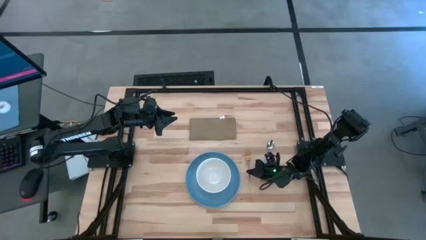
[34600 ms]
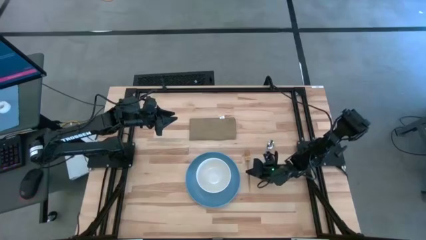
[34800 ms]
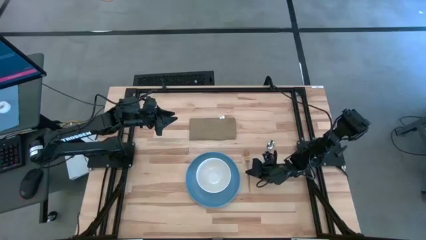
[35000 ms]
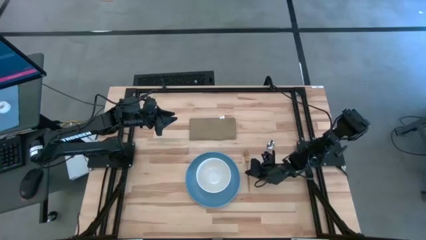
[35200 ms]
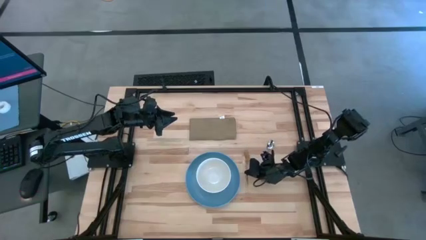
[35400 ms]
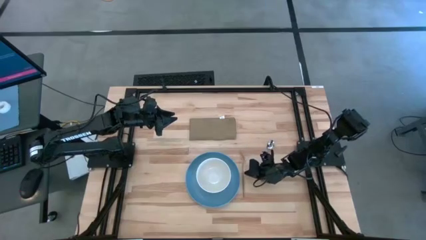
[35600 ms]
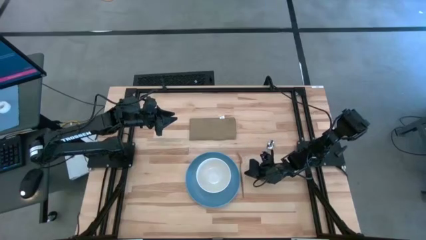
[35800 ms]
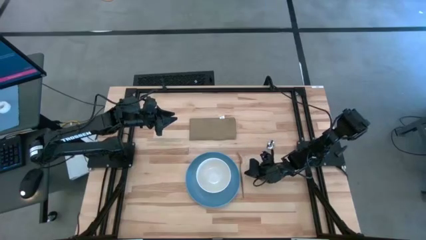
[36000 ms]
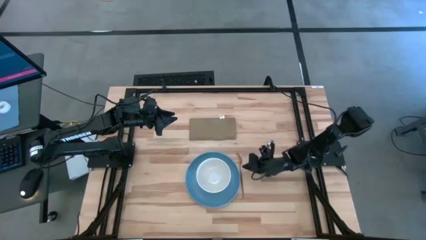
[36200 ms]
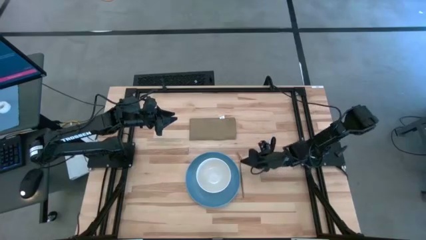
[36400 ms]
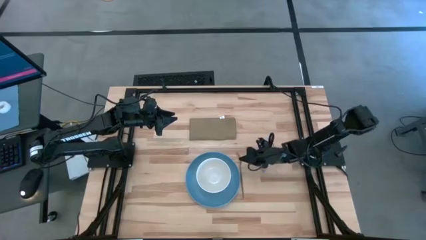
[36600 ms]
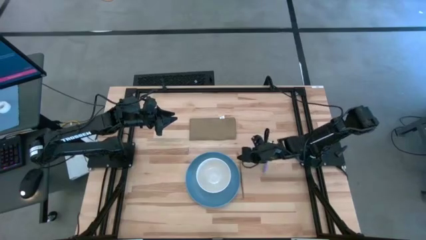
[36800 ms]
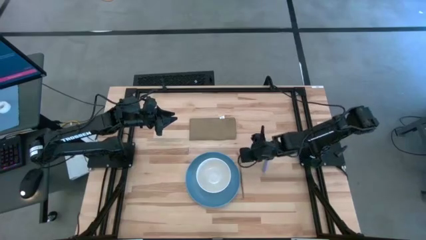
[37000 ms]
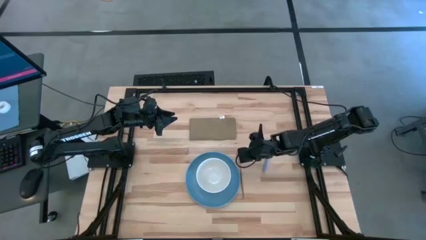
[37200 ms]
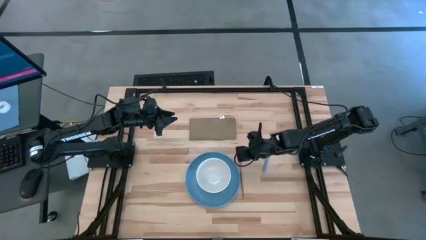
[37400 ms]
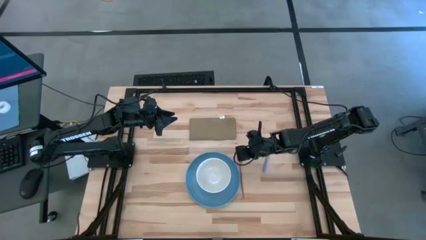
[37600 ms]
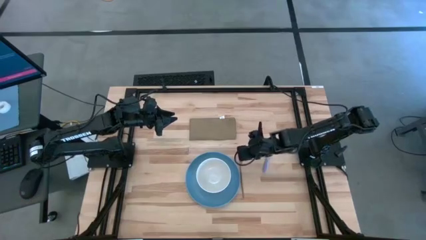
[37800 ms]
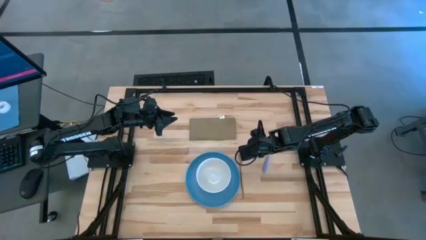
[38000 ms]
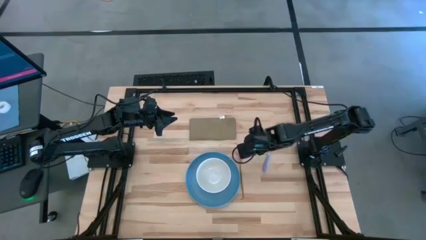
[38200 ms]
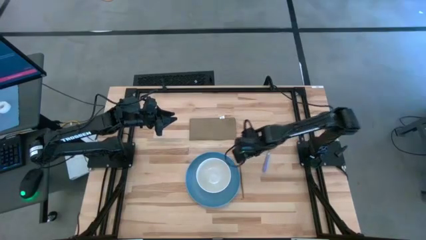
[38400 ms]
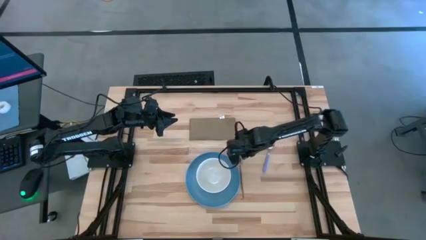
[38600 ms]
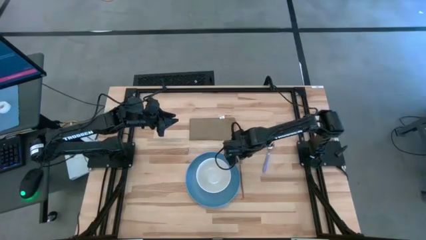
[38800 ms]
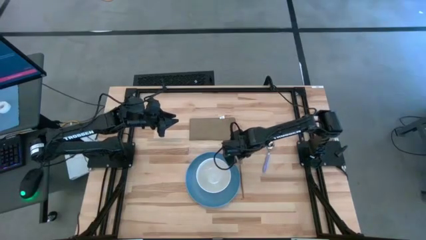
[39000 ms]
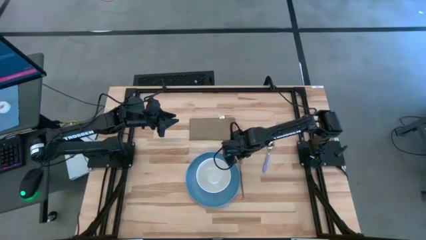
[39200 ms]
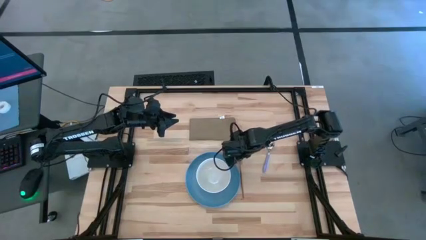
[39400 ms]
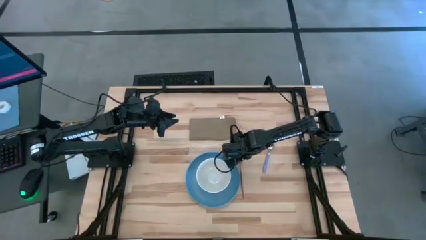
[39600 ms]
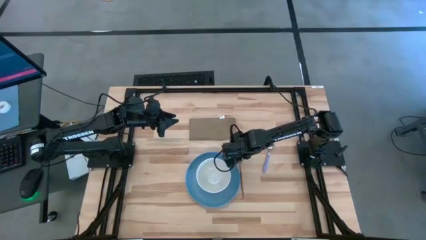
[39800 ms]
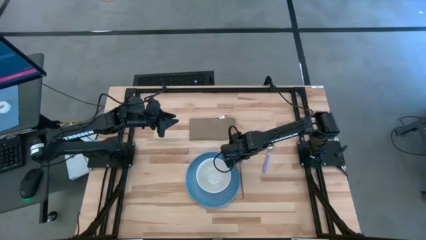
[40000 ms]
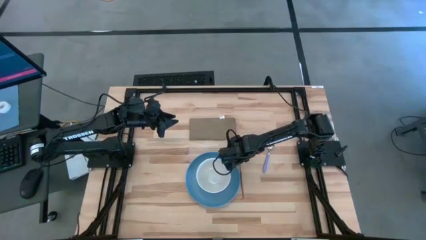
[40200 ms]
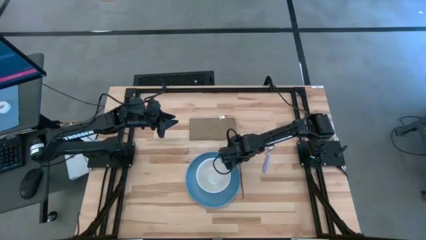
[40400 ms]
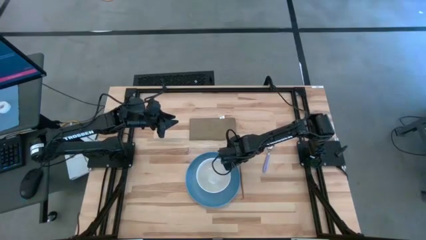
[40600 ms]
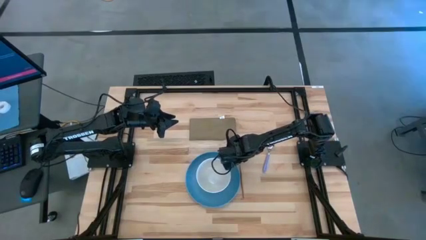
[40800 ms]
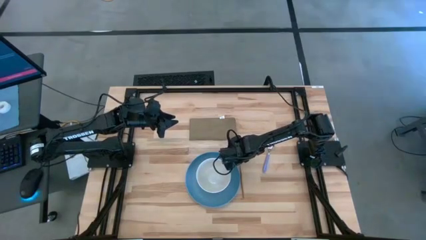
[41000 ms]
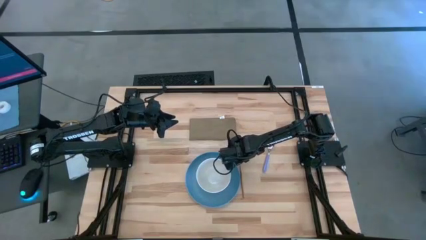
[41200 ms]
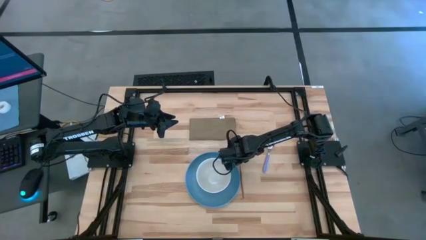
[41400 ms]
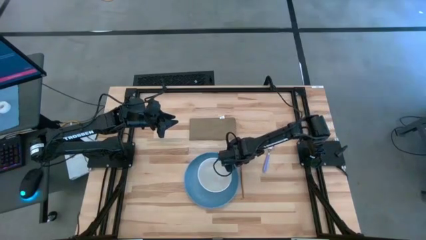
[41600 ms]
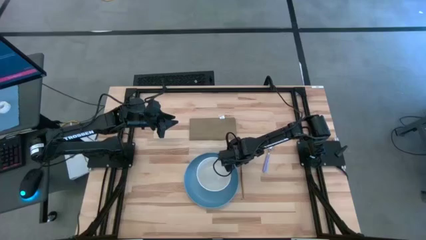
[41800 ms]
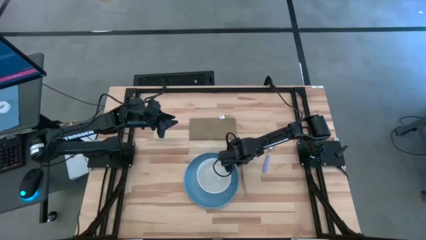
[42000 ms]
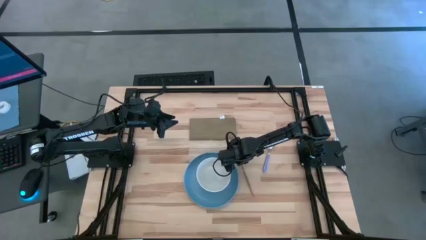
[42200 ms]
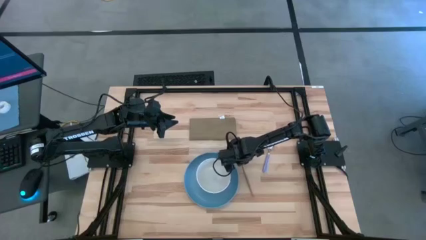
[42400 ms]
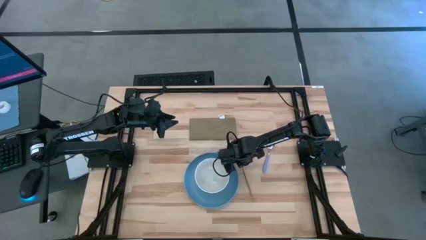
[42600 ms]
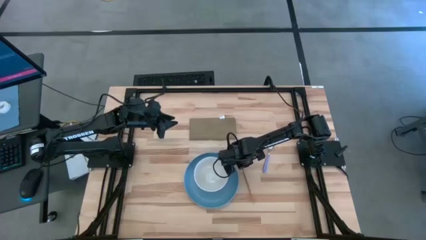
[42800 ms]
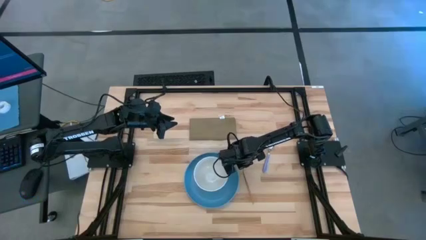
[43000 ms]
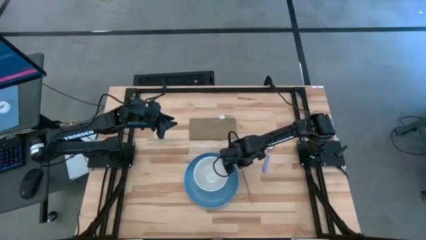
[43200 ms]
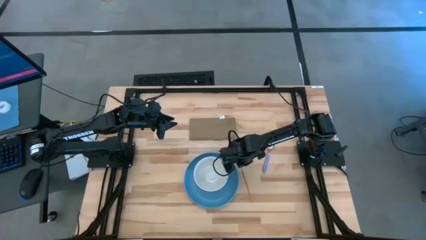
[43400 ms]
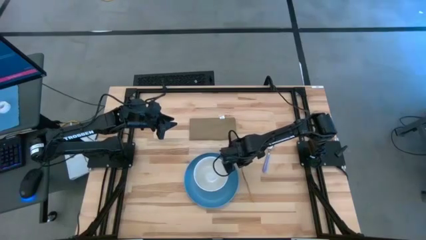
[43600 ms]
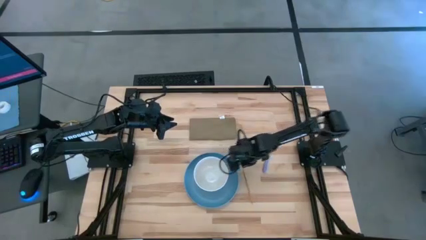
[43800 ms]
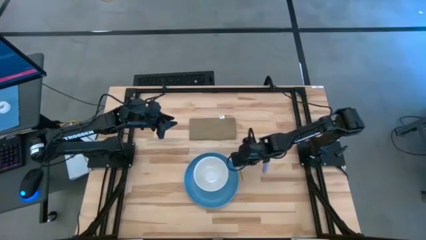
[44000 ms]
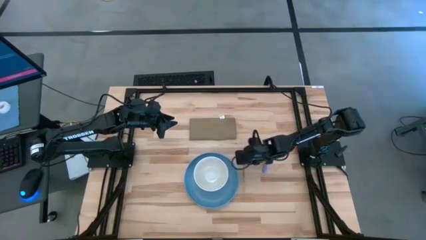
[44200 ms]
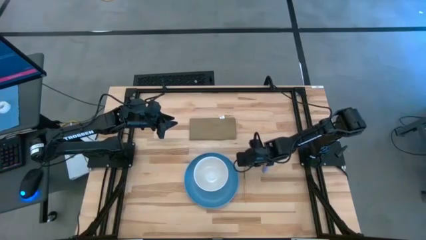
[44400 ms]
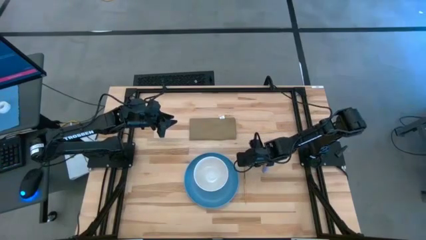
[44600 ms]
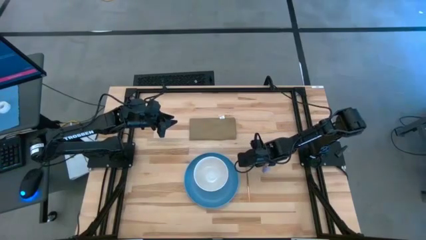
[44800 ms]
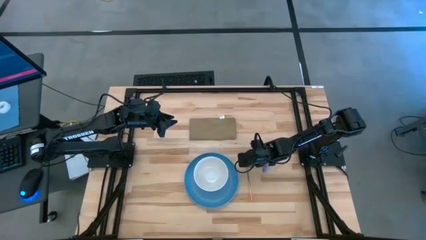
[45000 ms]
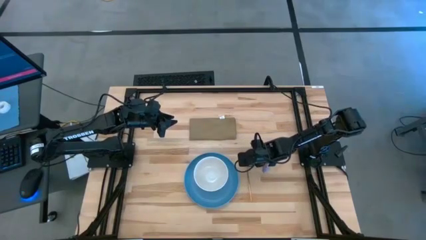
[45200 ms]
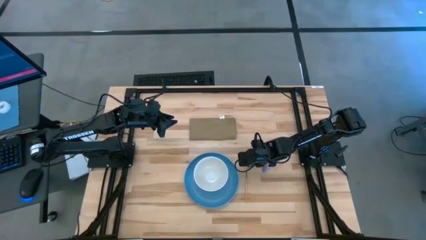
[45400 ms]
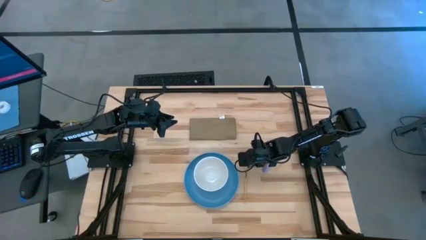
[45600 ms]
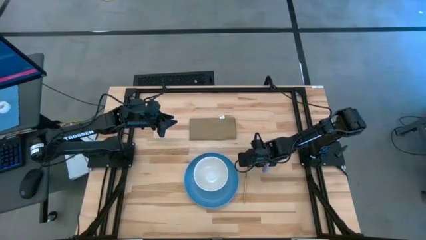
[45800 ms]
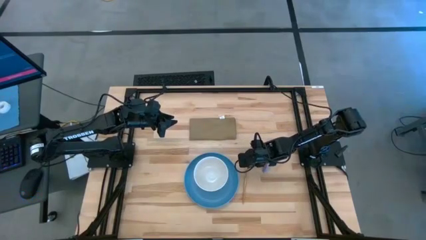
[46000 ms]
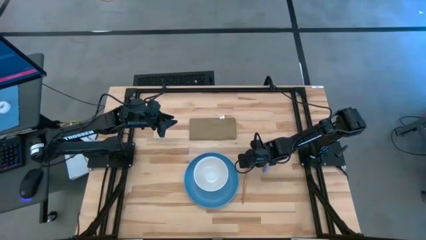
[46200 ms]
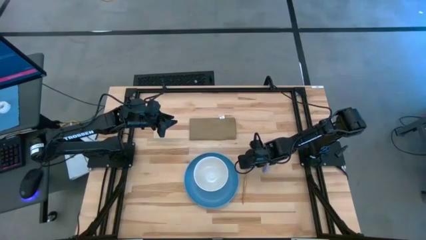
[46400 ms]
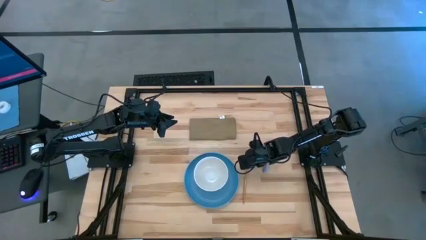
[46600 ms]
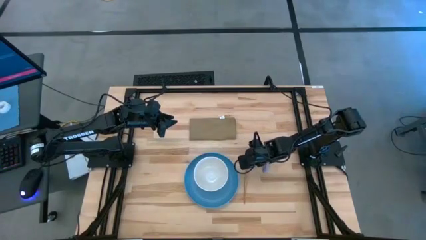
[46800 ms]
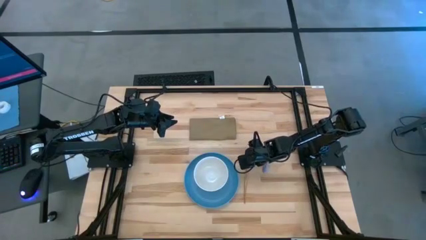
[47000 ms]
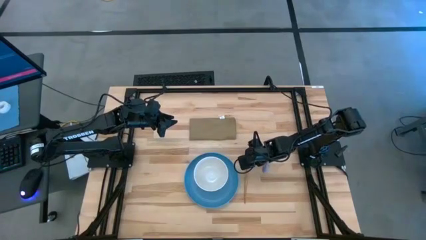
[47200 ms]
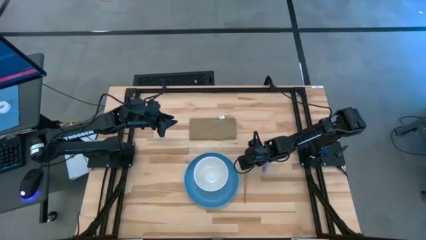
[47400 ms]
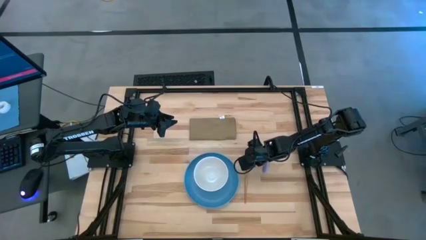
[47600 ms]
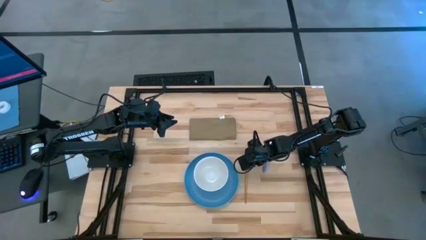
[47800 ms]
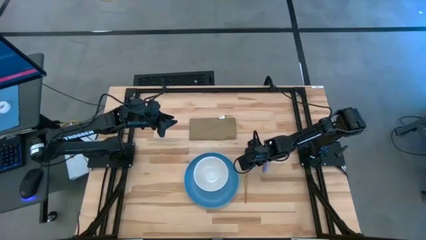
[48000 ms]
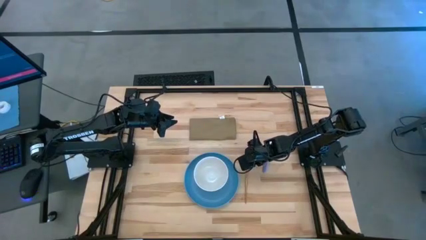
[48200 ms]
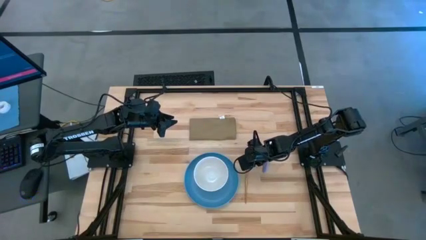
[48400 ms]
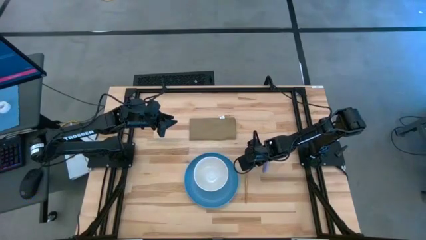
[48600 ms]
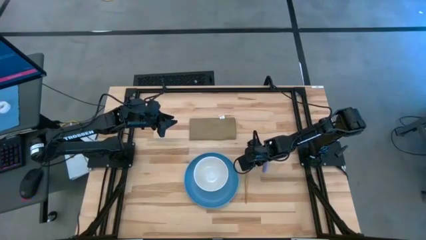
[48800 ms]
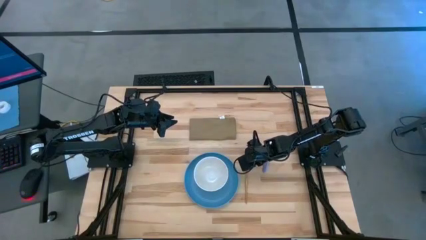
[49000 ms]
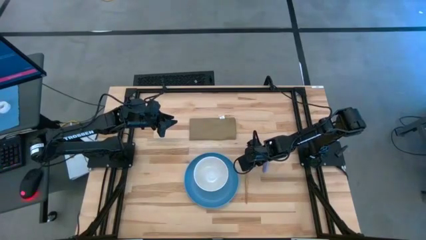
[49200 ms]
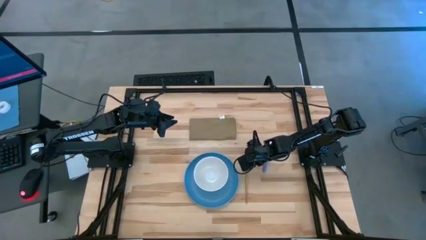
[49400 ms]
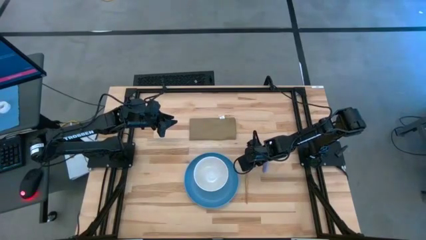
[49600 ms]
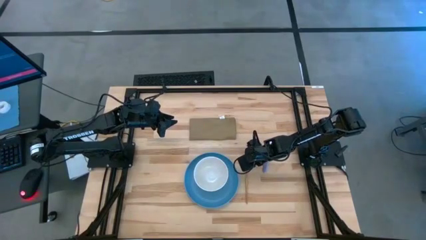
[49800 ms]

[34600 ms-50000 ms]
Task: Set table place
Move the gold fork to the right of the blue plate

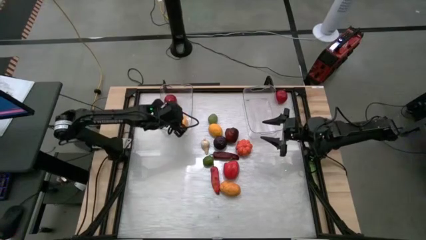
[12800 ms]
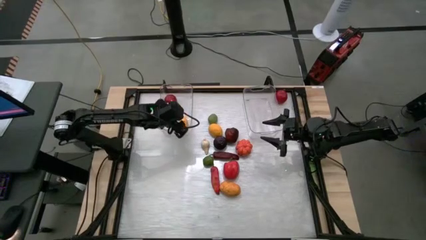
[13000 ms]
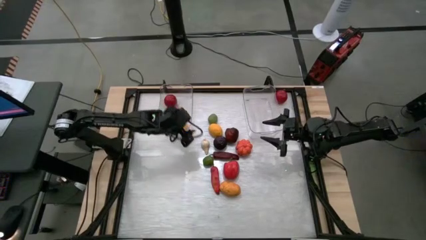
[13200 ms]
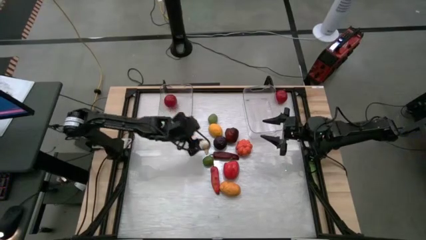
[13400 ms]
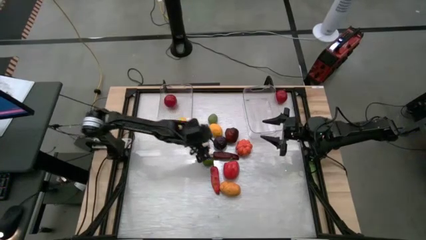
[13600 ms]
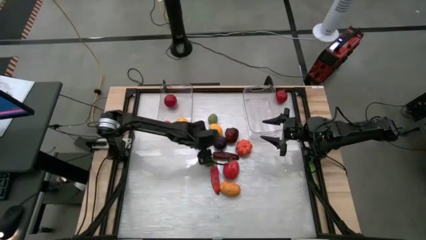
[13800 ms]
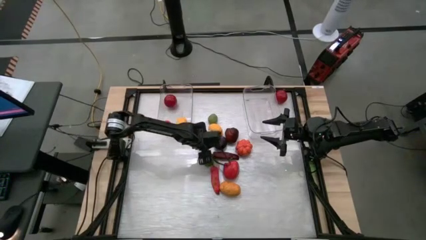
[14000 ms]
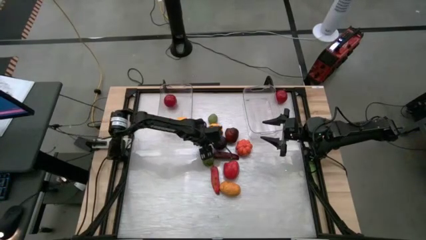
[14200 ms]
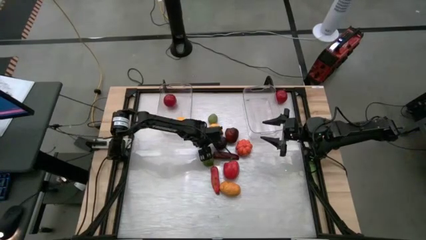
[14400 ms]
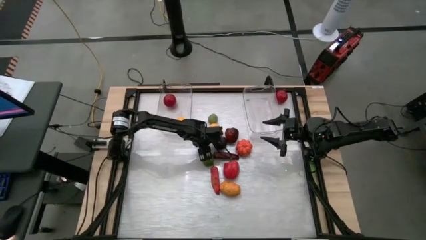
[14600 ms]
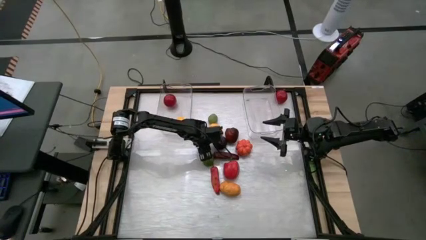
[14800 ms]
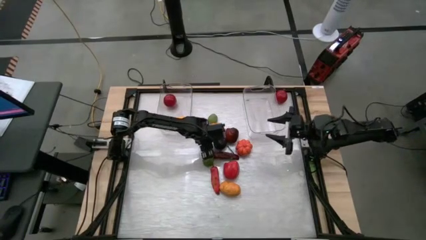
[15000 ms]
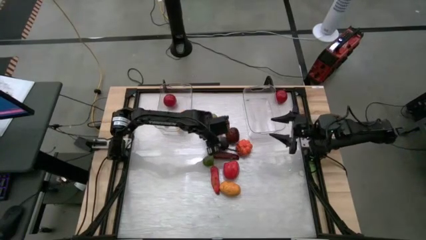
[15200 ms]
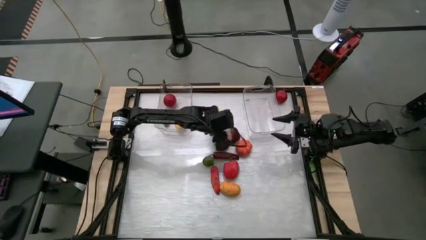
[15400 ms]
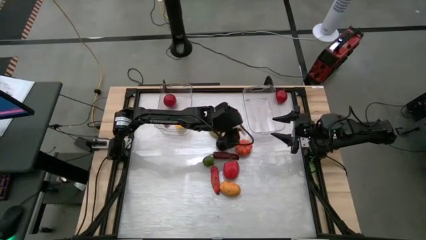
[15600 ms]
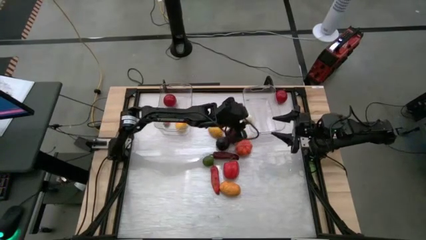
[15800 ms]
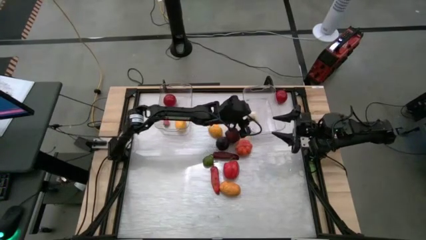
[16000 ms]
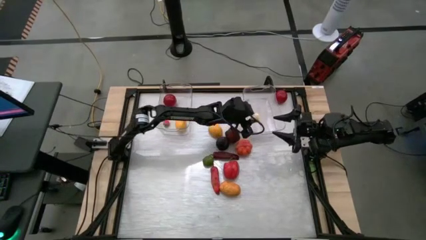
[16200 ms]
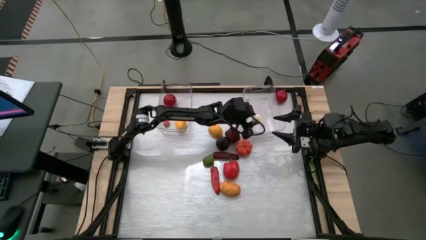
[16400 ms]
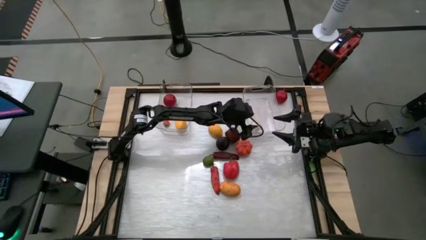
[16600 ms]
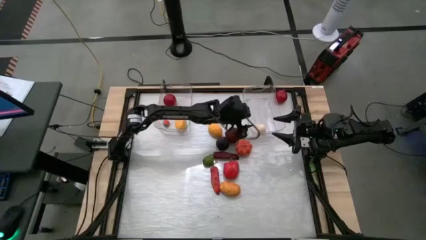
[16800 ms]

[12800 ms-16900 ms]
Task: Sort produce into baskets
Put the garlic into the right transparent bin
